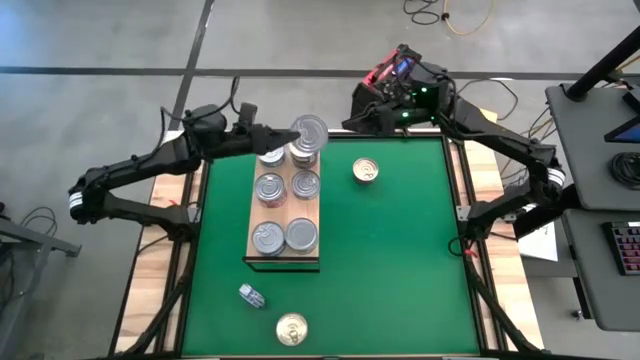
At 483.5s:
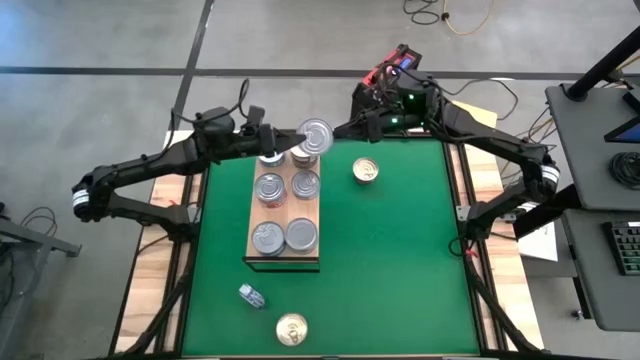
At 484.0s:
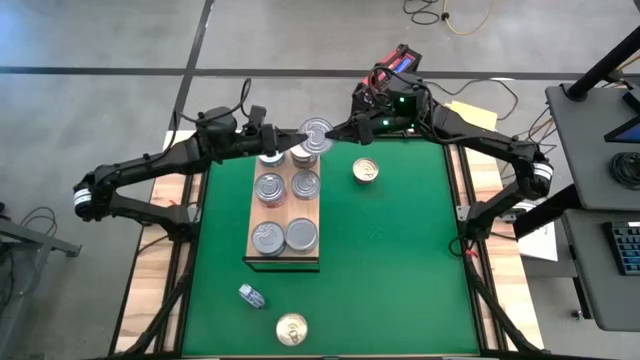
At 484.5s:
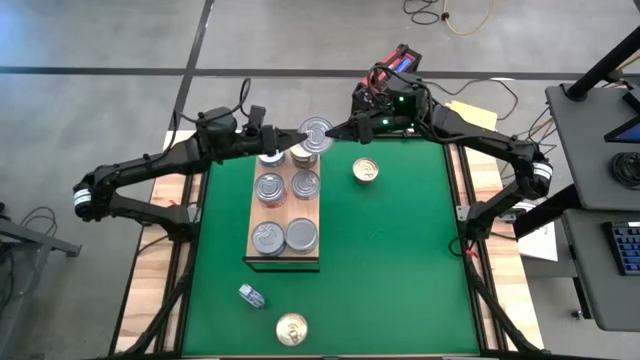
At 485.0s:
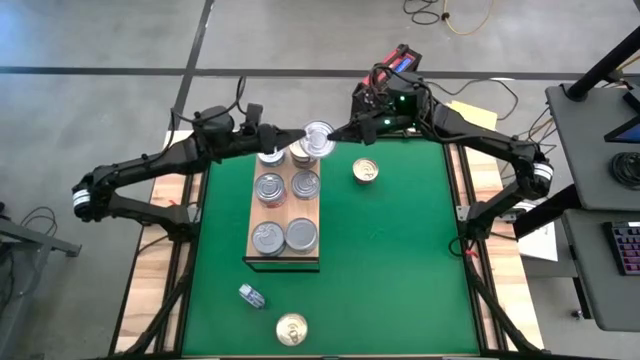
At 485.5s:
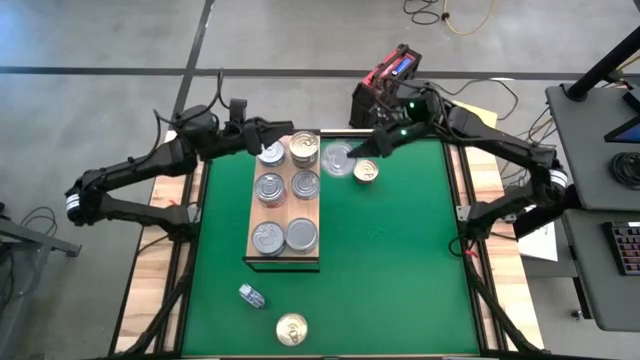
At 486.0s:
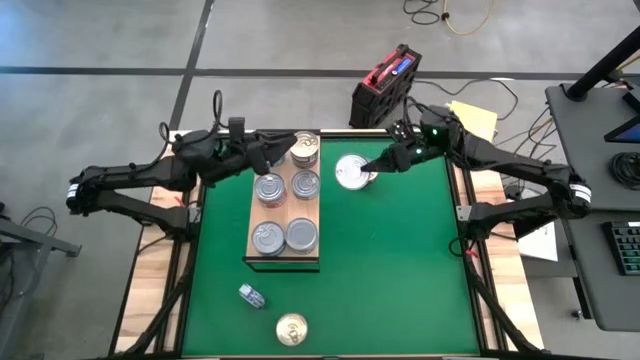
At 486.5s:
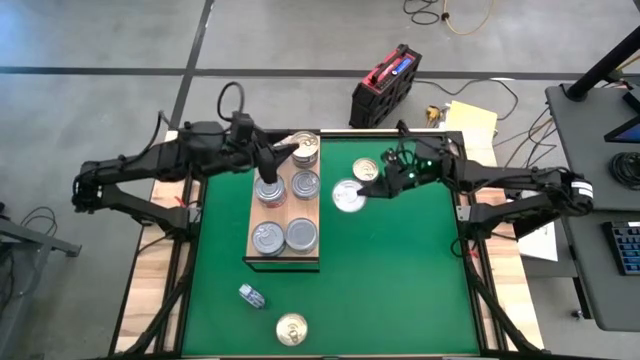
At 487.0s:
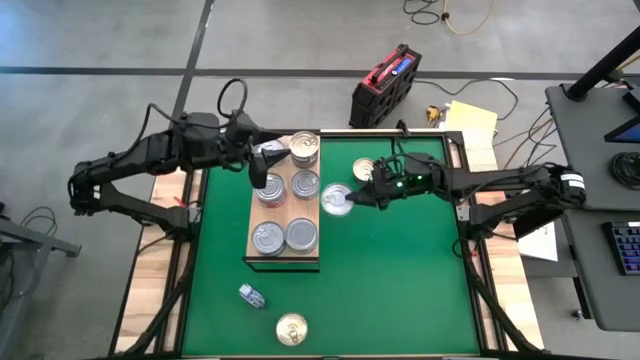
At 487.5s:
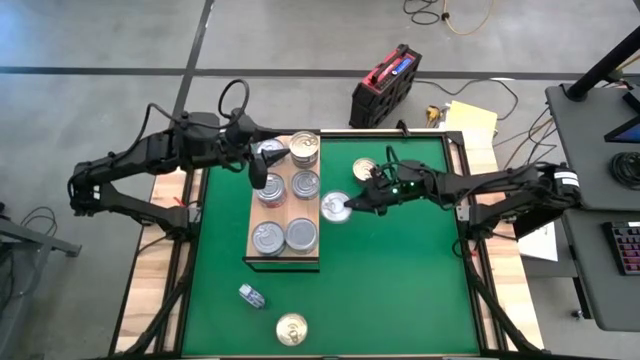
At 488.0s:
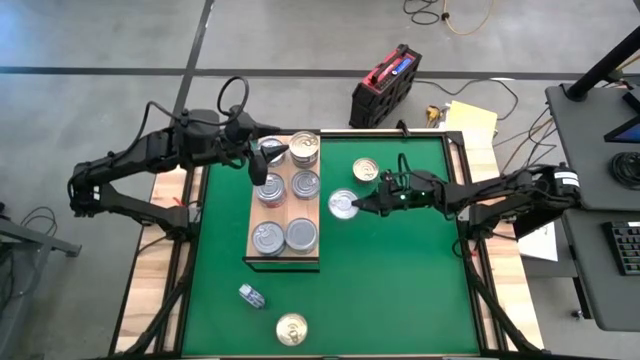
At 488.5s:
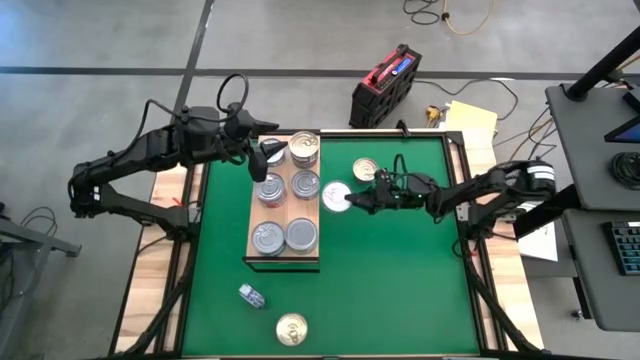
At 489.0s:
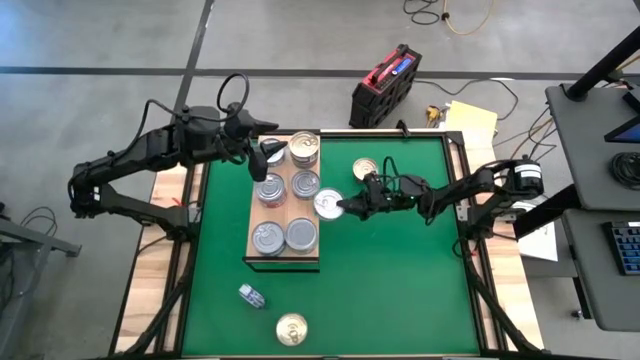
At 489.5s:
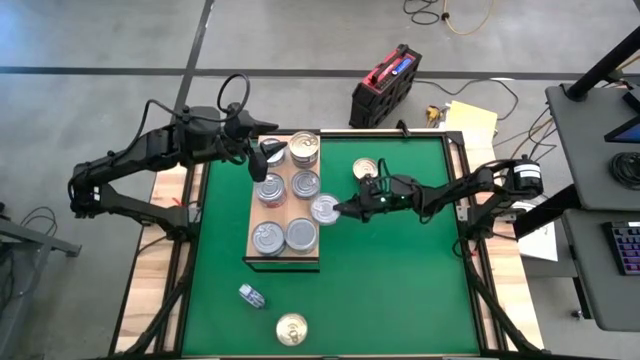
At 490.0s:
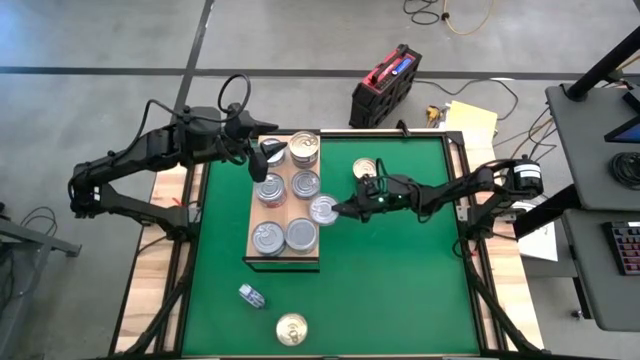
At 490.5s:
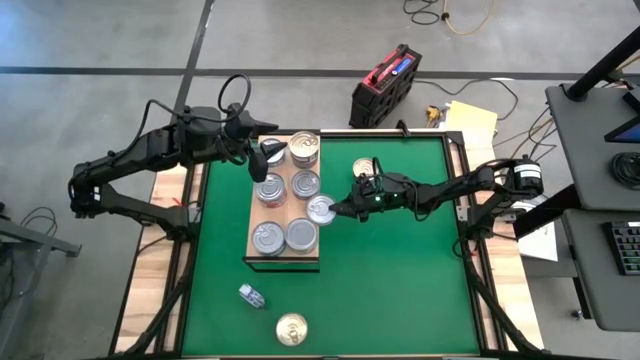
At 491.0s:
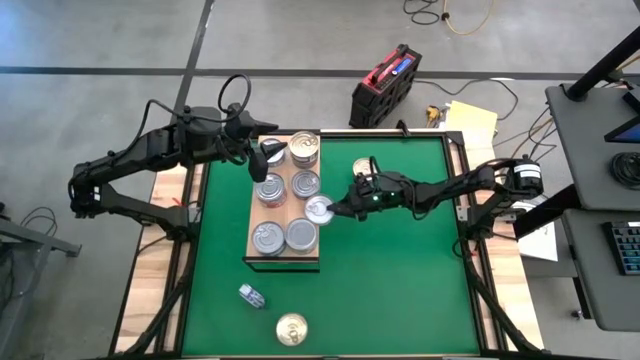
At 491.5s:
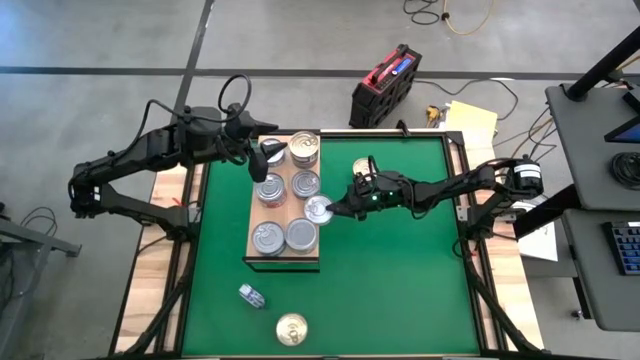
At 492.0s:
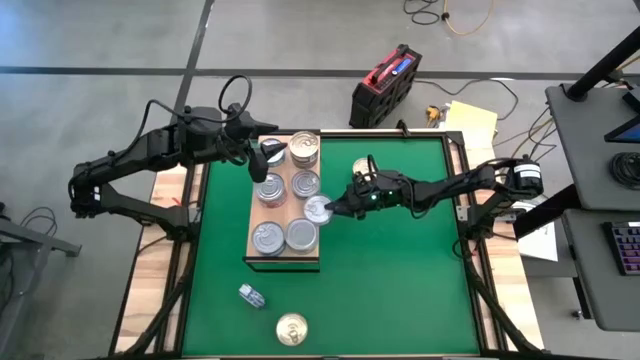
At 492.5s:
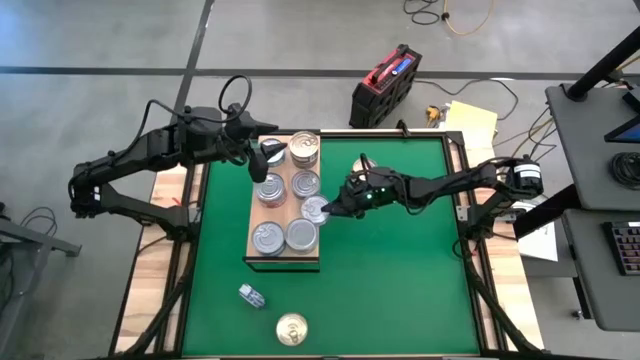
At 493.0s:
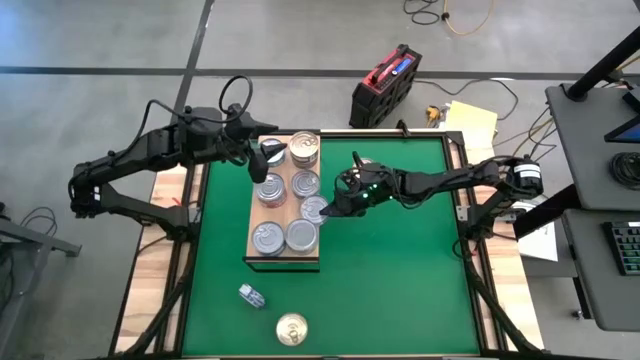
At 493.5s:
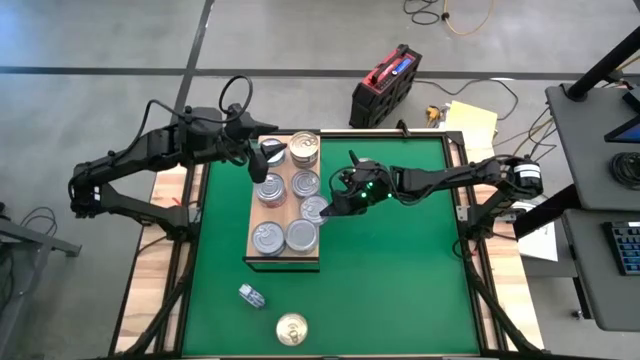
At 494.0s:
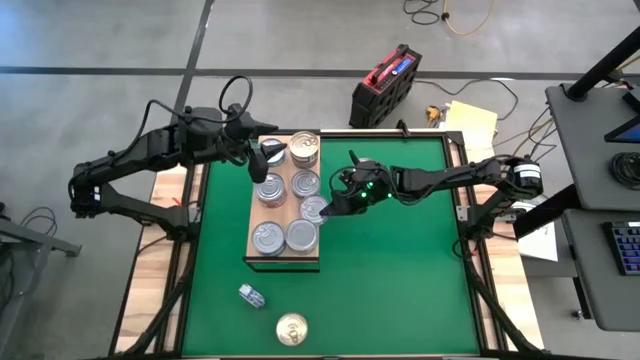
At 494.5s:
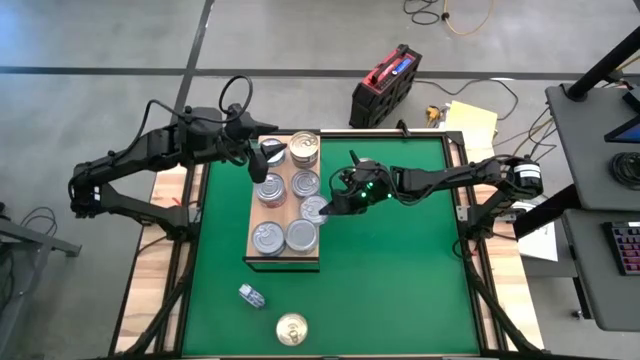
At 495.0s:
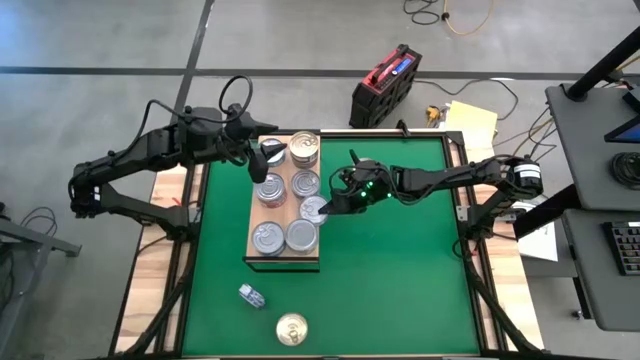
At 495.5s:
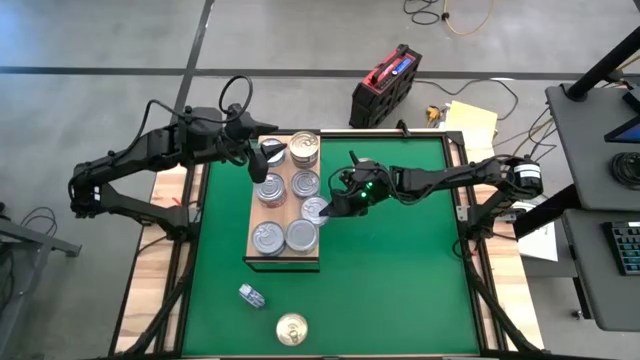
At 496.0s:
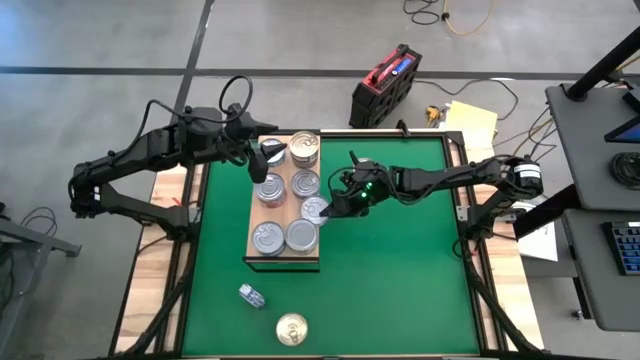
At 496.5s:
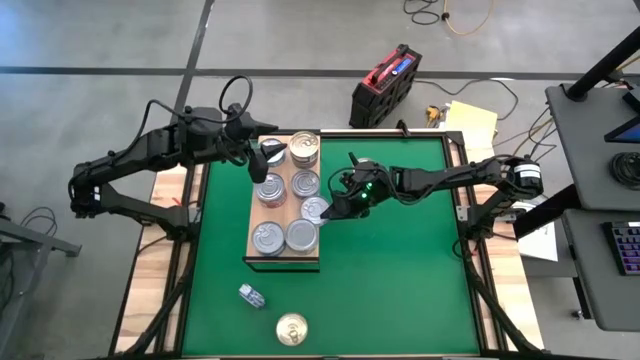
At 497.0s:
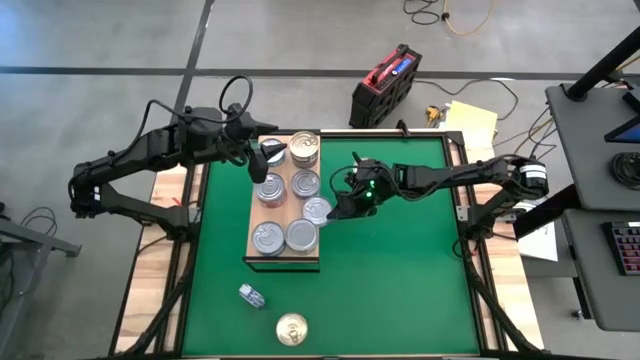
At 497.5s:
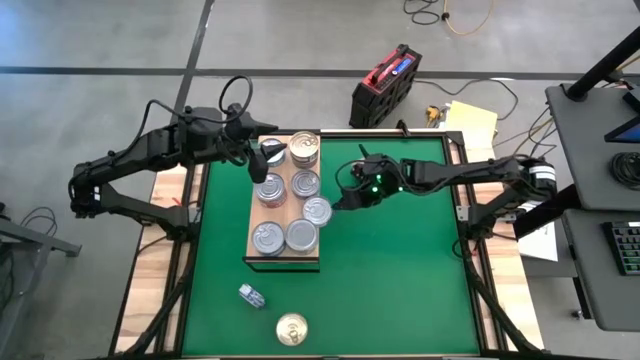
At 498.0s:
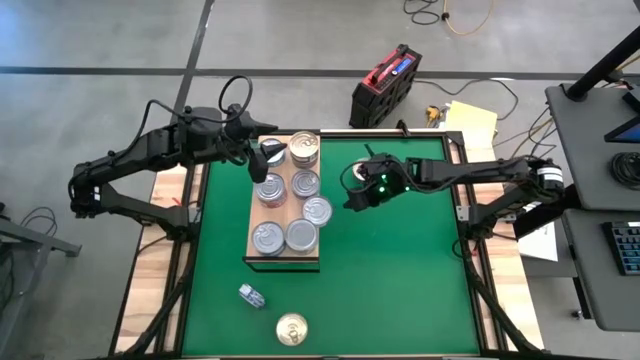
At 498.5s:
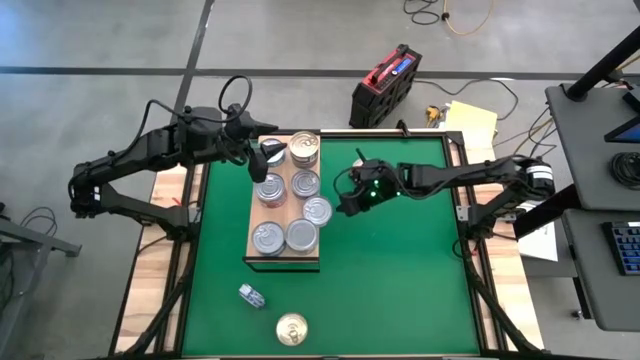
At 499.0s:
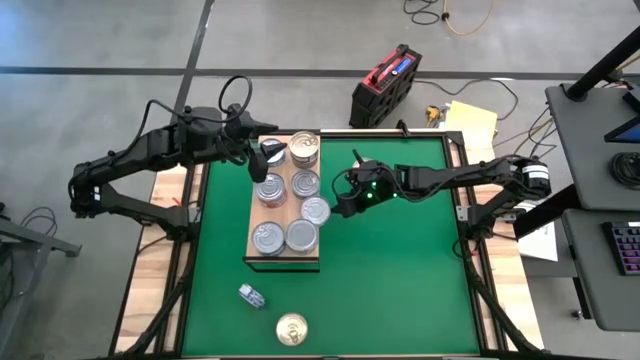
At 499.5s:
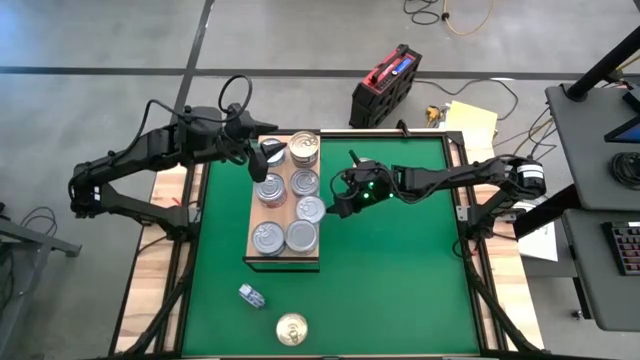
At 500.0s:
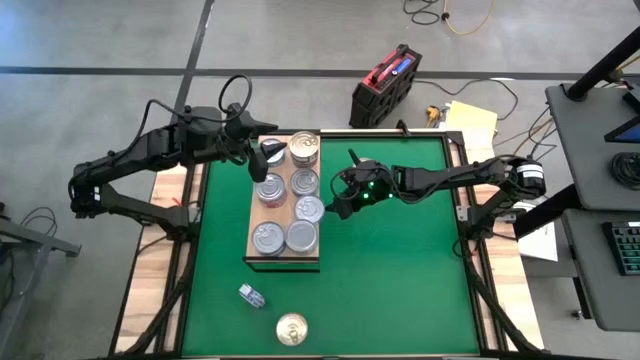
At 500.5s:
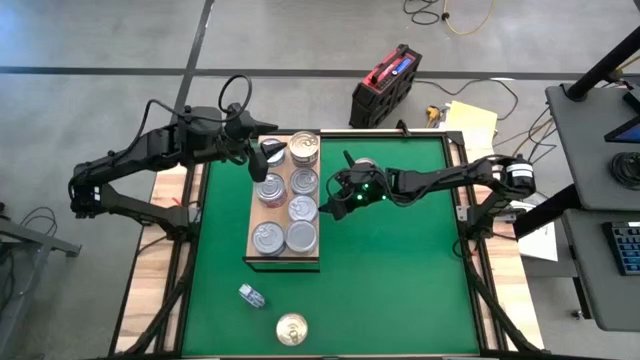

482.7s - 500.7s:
Task: Stack canned seafood by type on shelf
Put the blue tuna can on the shelf

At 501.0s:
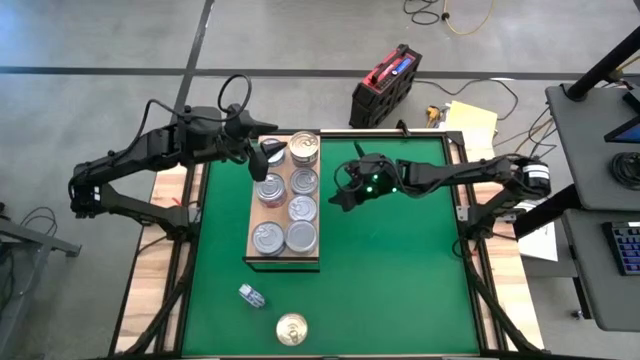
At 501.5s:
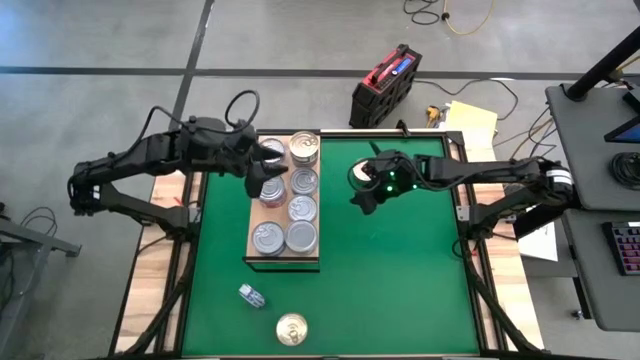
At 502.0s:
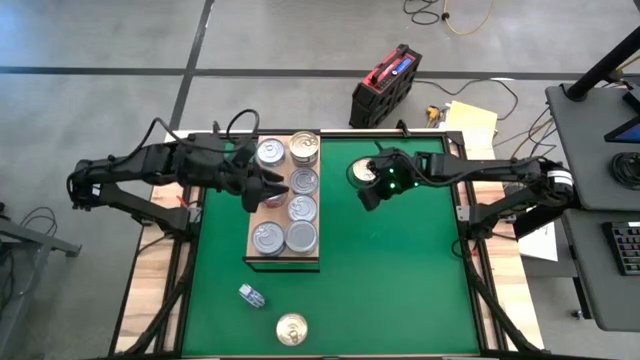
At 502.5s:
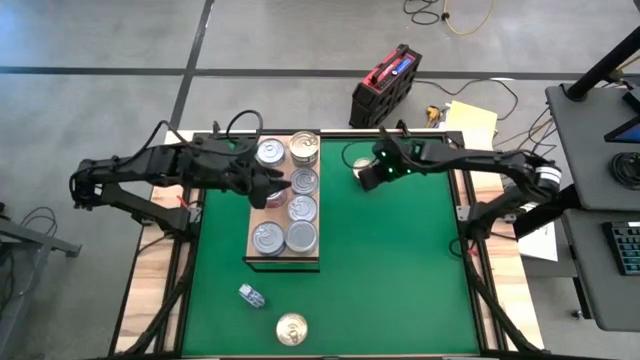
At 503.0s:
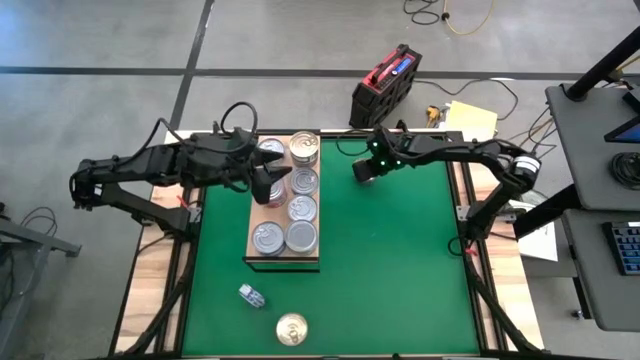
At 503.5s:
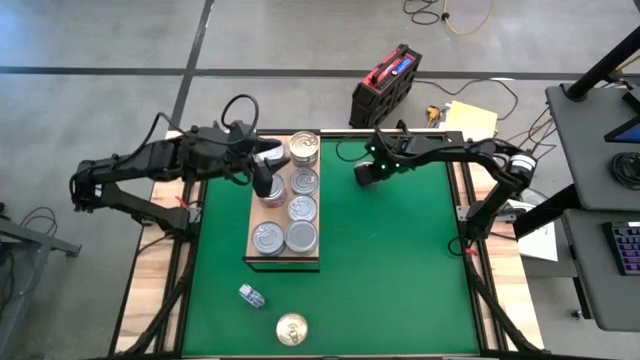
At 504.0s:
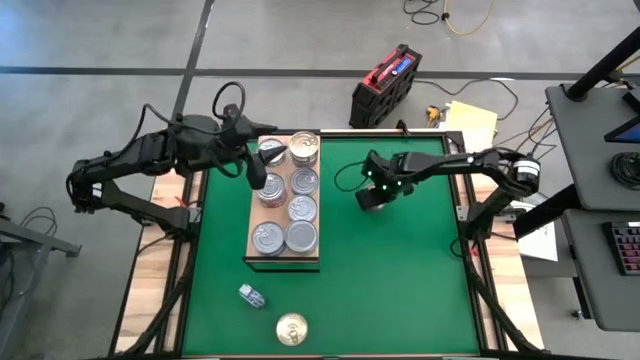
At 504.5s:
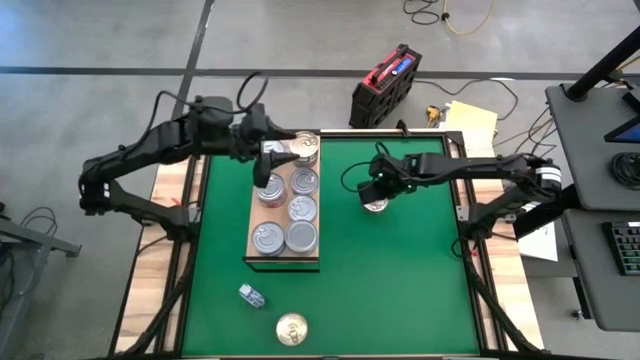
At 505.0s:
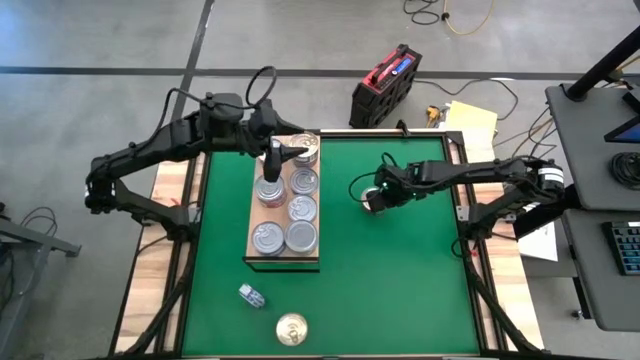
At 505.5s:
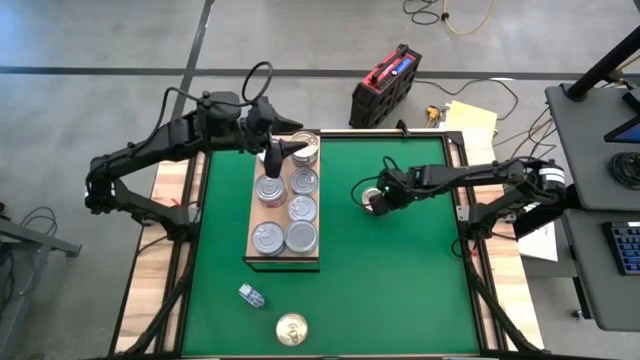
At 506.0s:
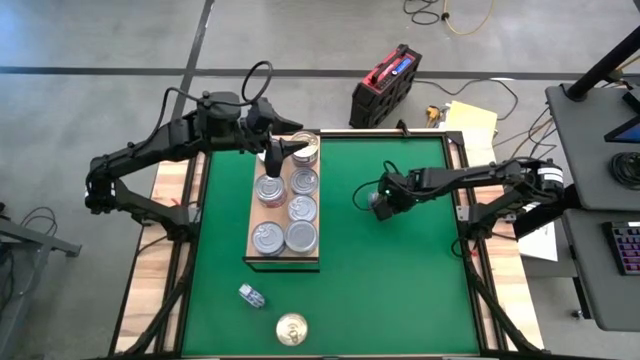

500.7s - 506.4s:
Stack the blue and pink tuna can on top of the blue and pink tuna cans on the shelf
